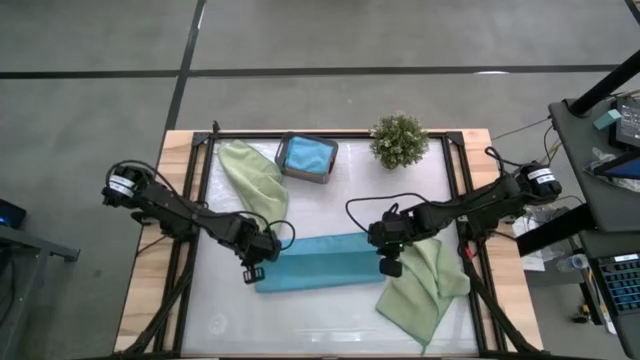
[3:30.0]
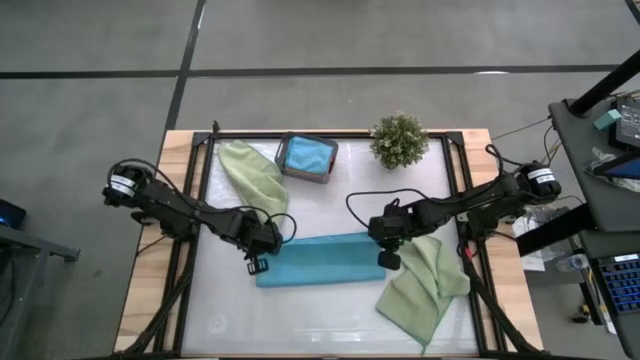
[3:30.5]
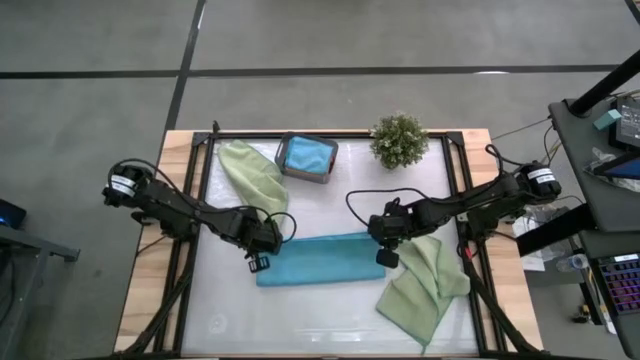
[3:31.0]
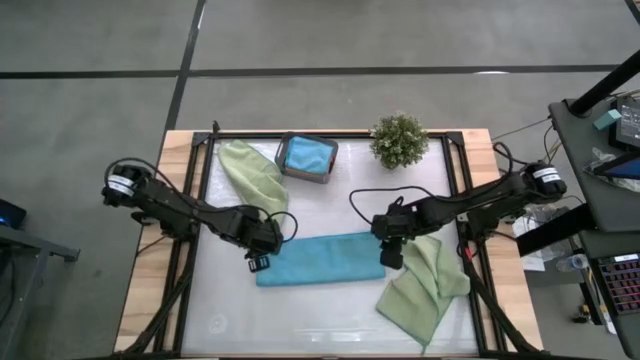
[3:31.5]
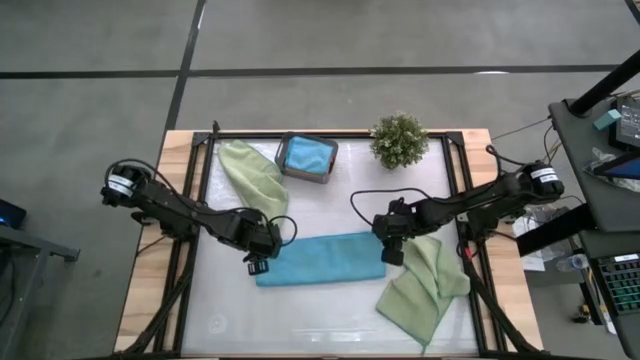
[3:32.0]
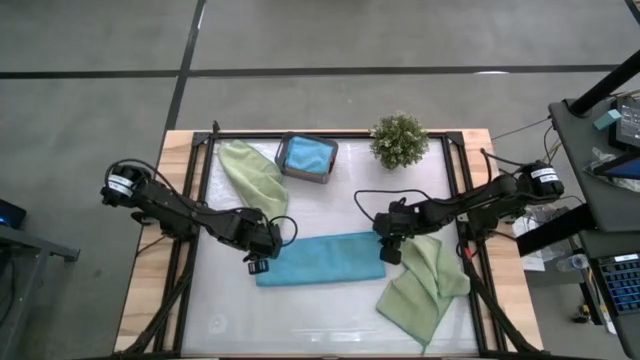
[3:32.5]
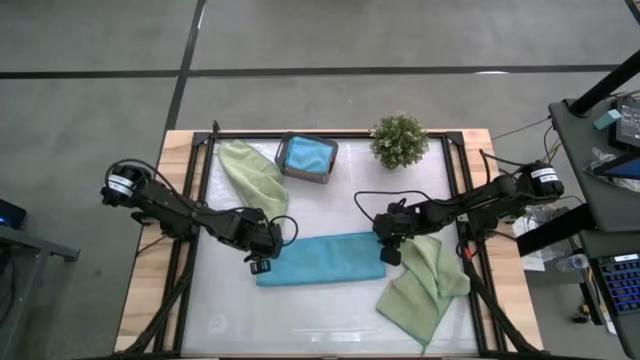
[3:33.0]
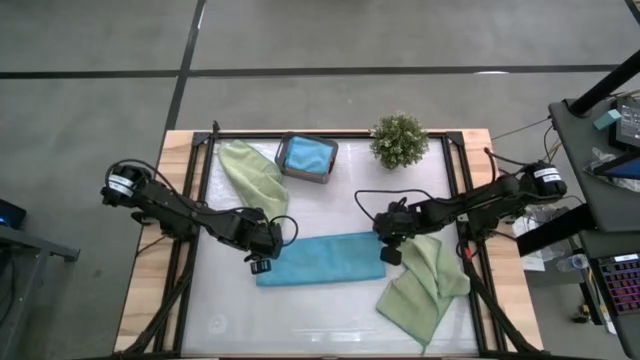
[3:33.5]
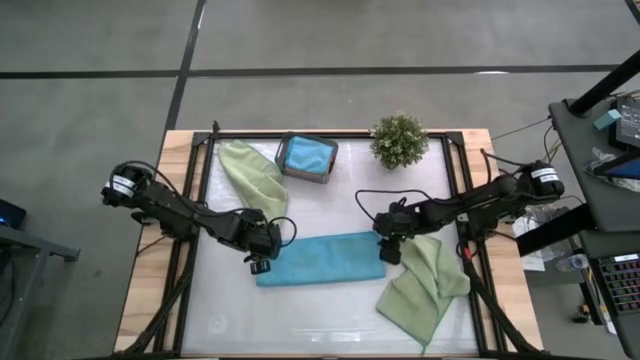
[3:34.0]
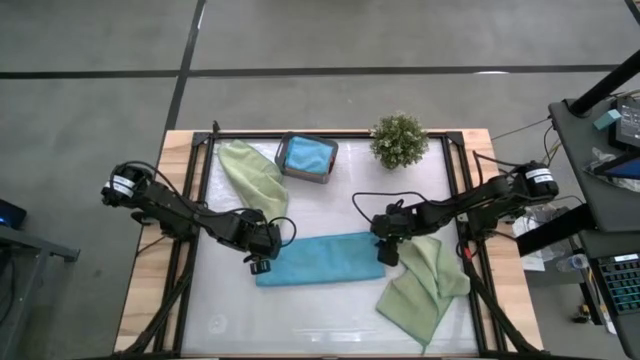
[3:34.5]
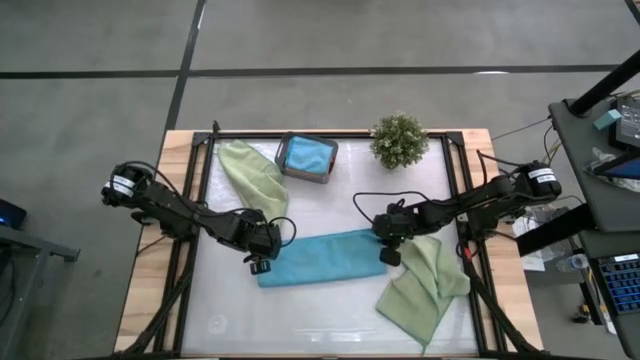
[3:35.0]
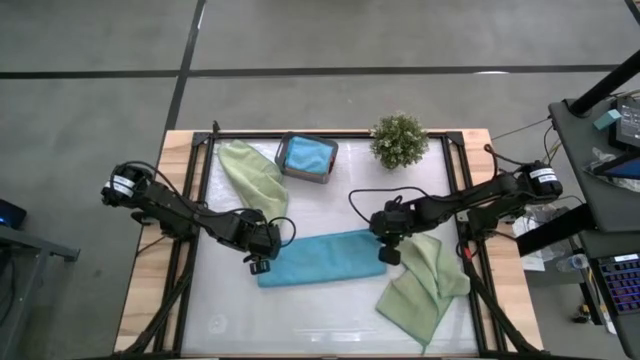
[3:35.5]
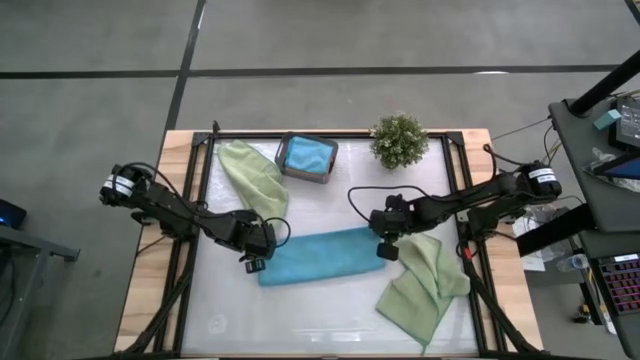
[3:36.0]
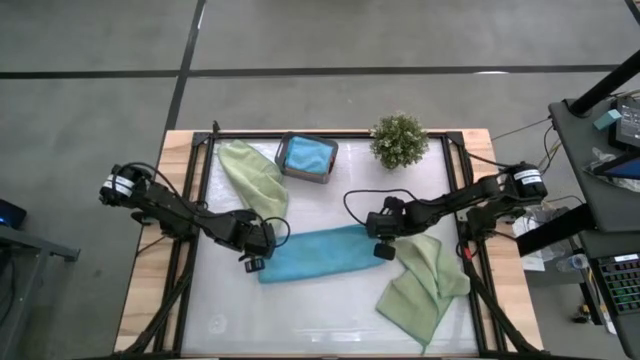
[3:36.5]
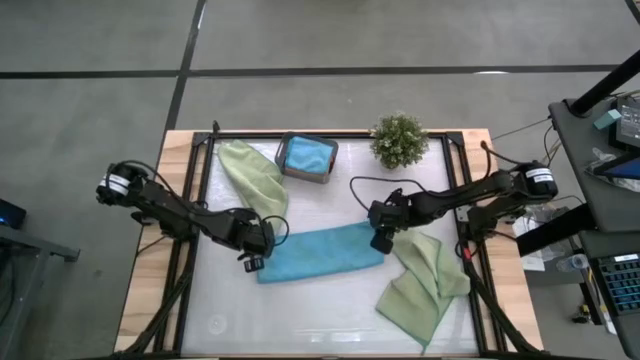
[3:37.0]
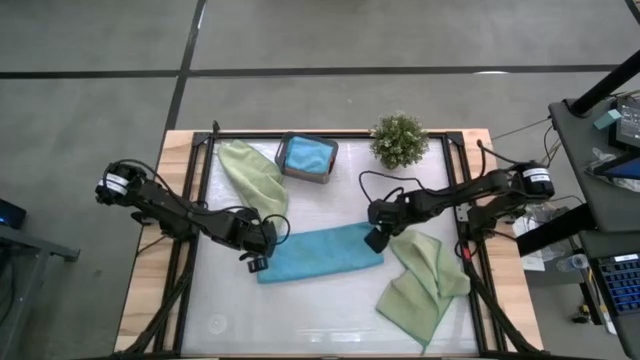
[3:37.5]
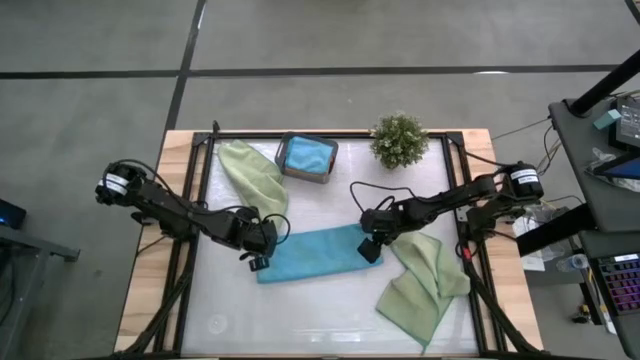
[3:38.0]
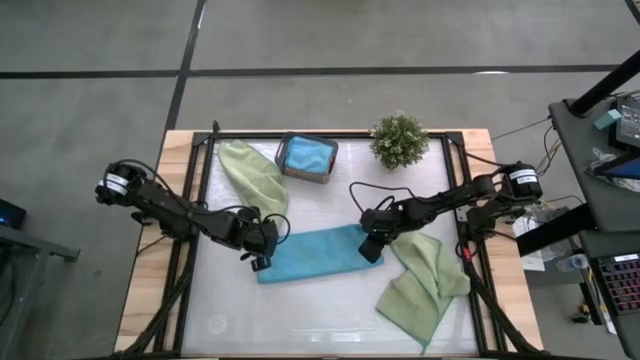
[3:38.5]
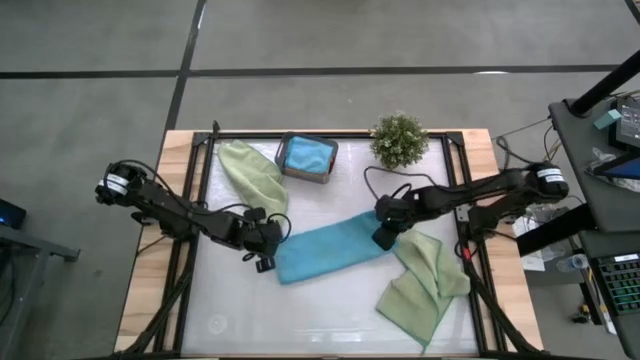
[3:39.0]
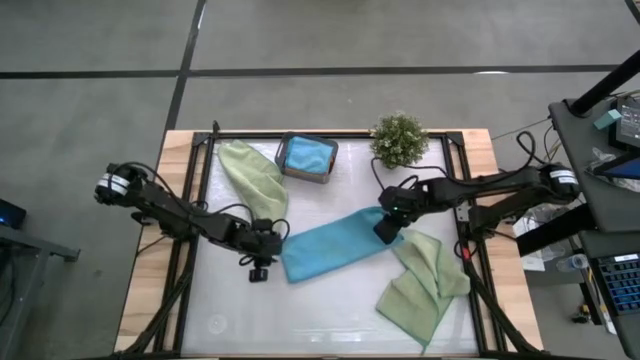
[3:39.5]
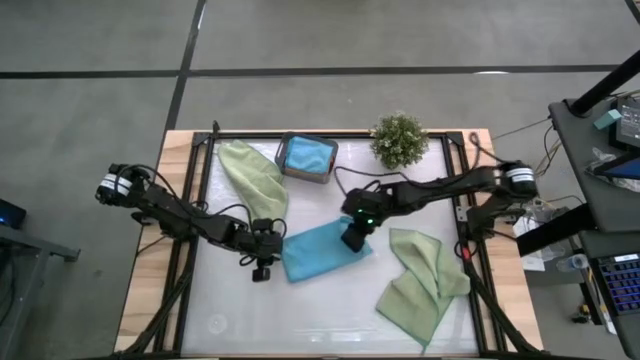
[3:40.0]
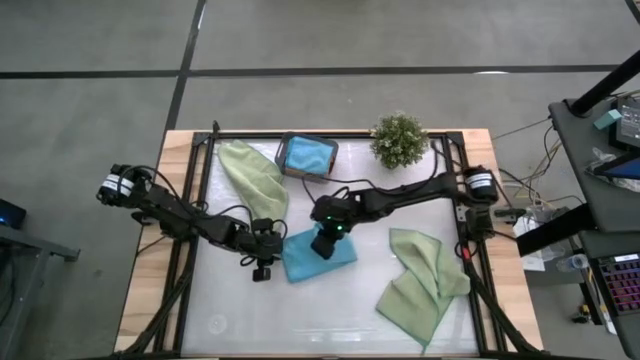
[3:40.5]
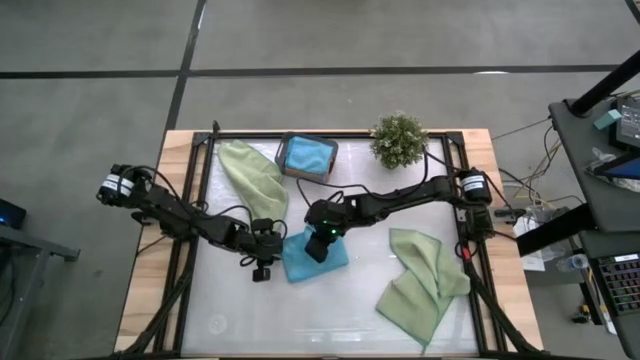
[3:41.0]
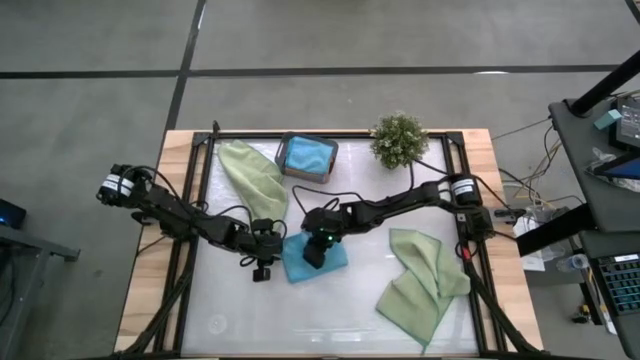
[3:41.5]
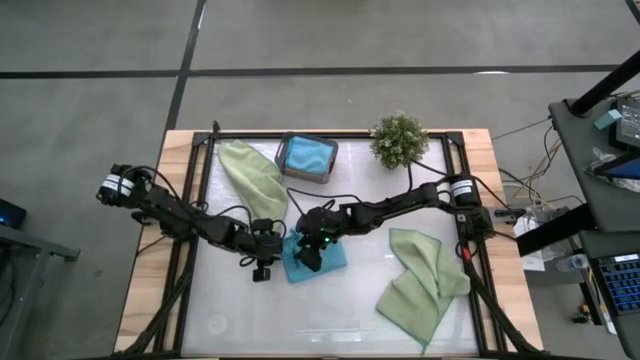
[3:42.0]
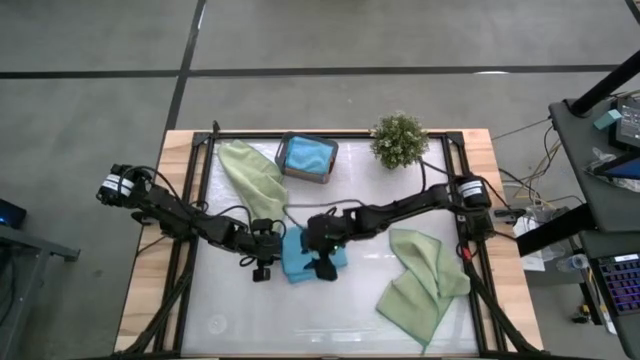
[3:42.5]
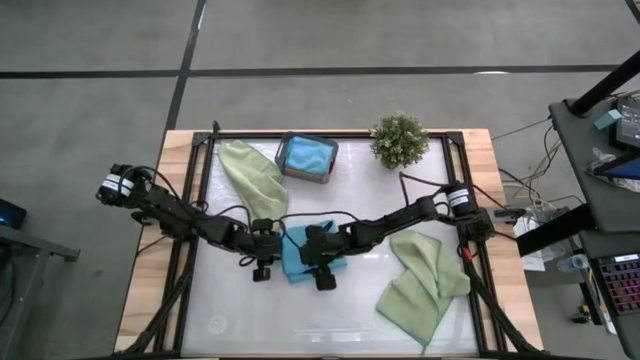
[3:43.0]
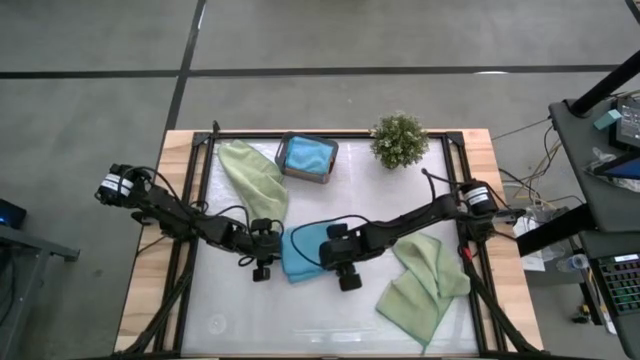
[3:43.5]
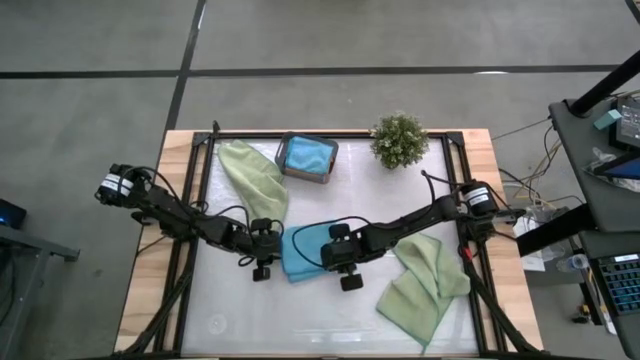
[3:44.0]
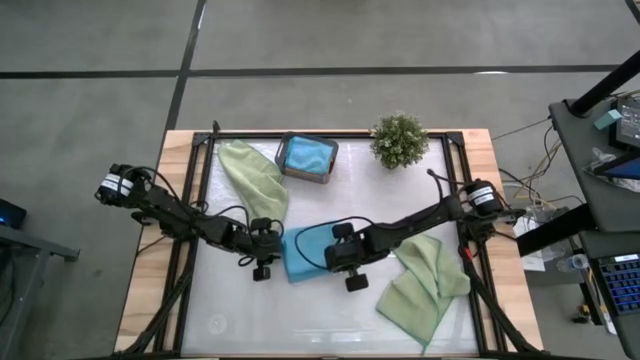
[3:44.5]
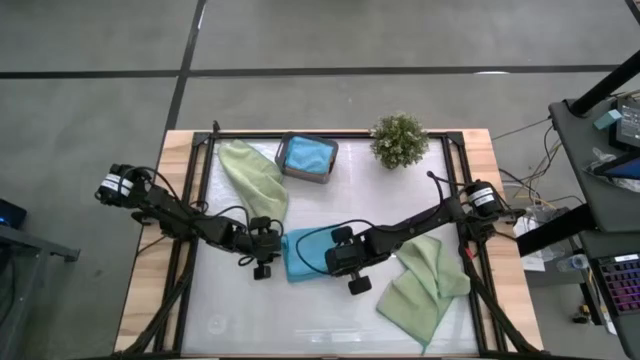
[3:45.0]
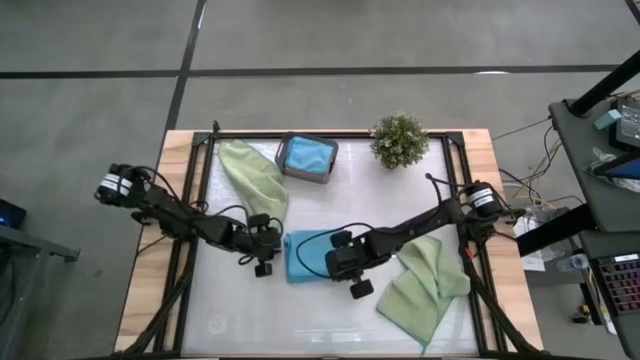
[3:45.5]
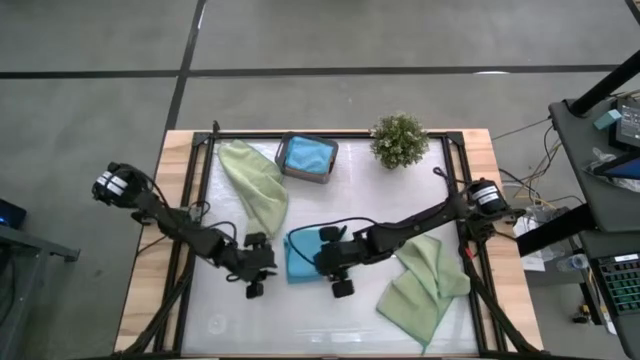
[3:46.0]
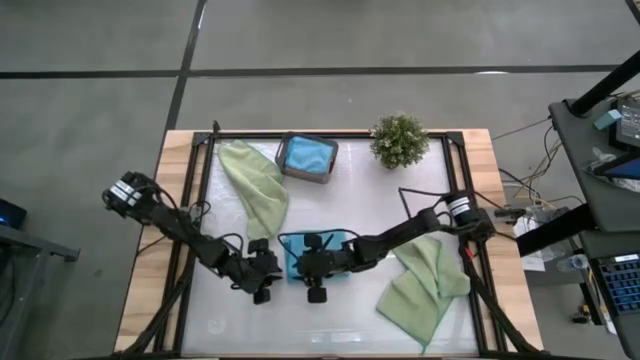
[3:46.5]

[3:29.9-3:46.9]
Task: Fold microfiber towels
Fold the blue microfiber towel

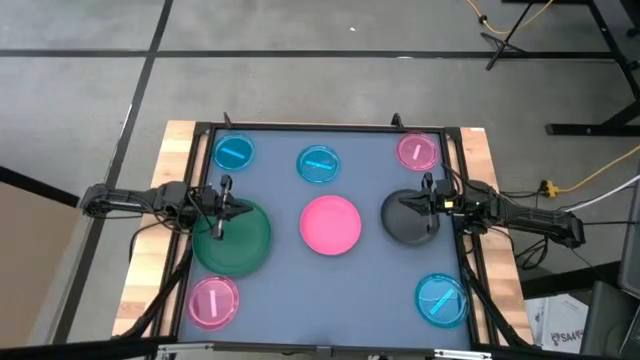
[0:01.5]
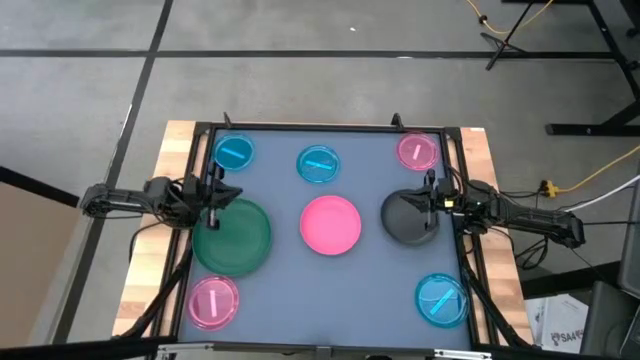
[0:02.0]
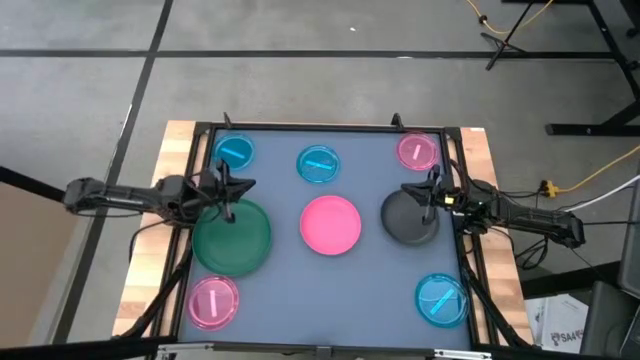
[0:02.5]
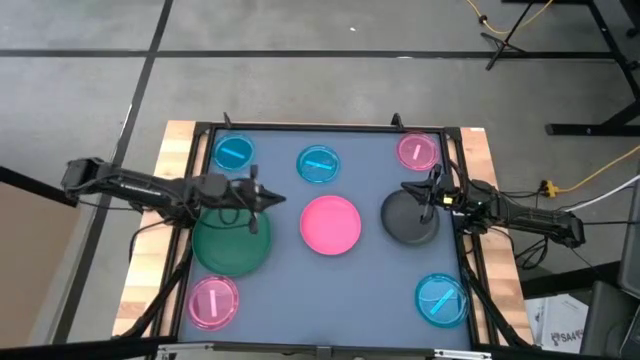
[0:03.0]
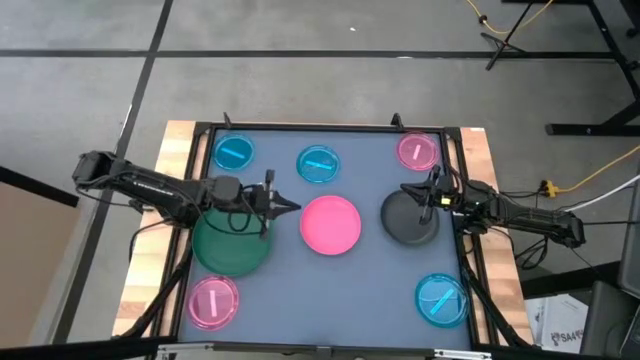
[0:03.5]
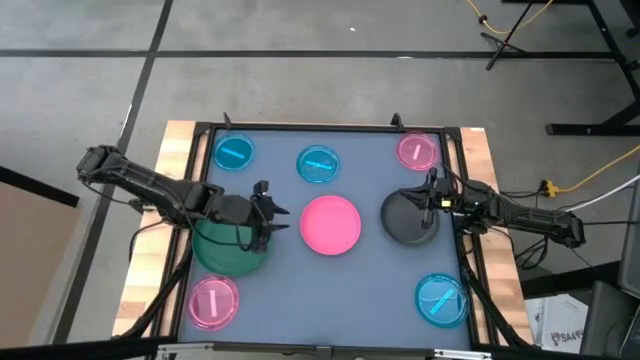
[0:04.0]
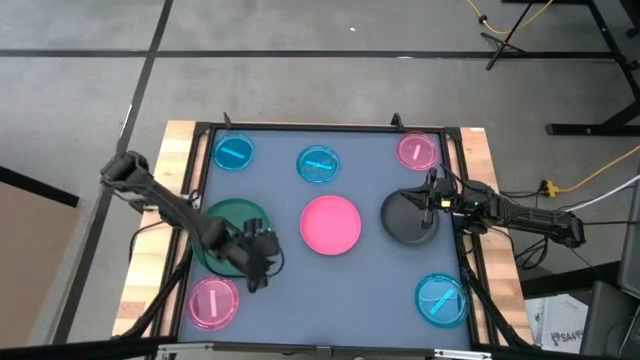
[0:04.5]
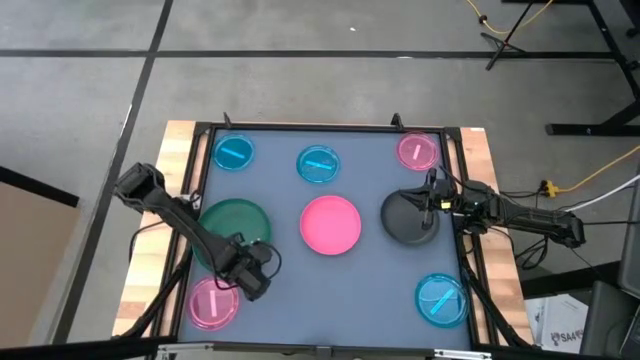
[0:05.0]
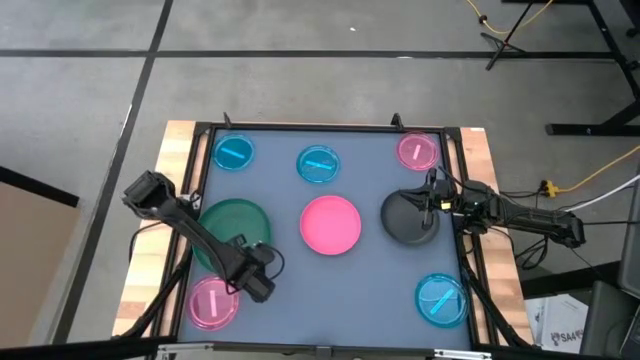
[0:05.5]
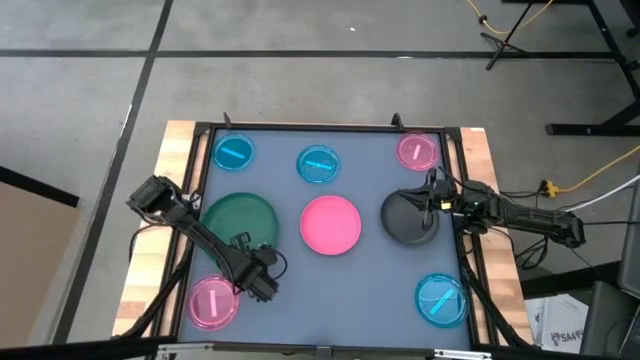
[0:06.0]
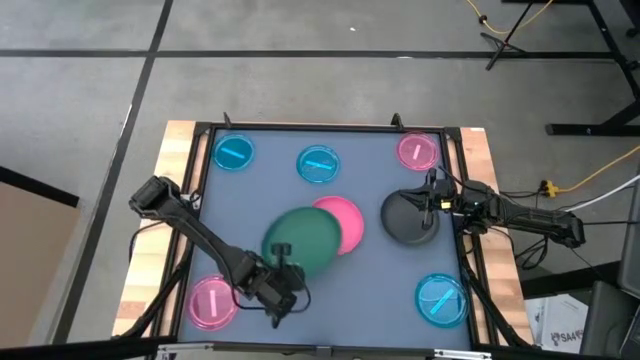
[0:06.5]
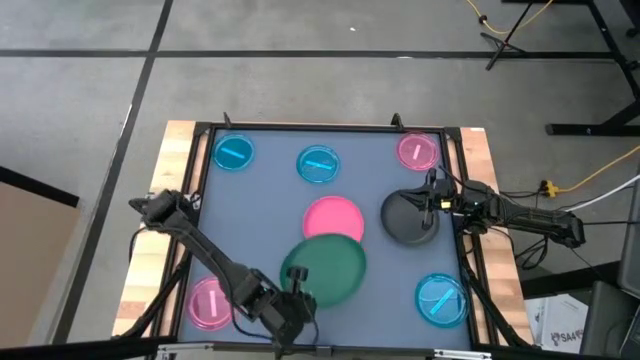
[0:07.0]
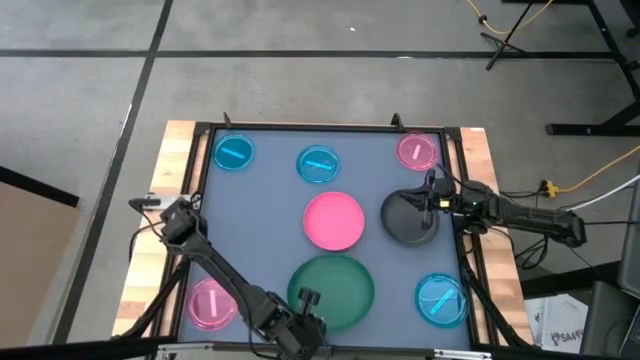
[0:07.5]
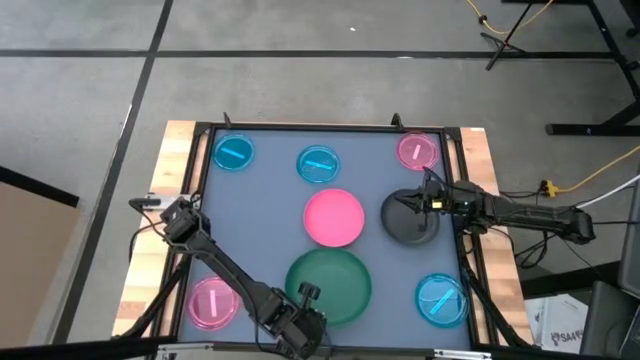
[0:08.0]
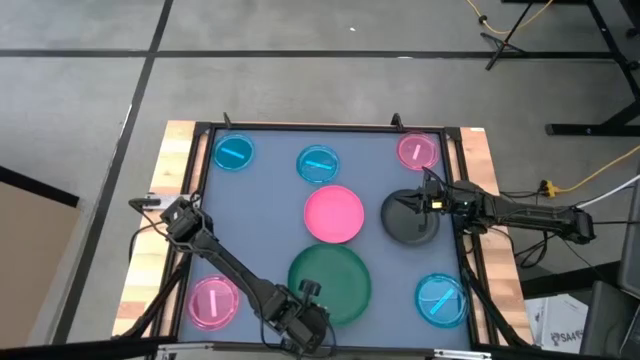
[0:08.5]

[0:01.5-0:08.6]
Task: Stack plastic plates
Move the green plate to the bottom of the table
